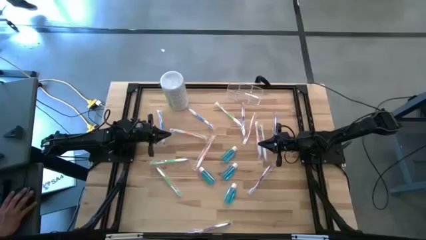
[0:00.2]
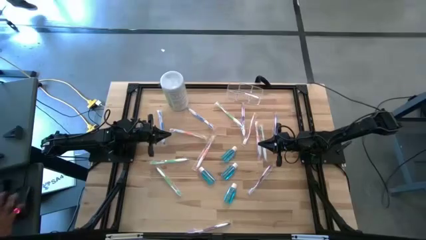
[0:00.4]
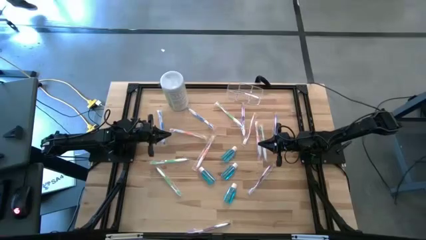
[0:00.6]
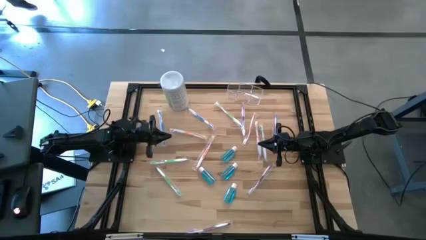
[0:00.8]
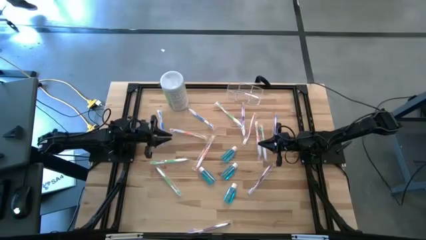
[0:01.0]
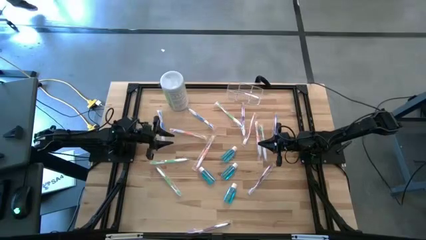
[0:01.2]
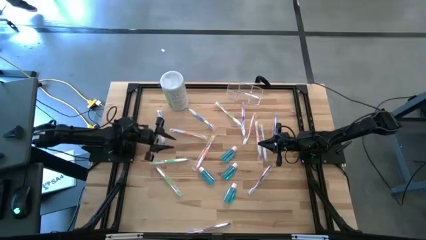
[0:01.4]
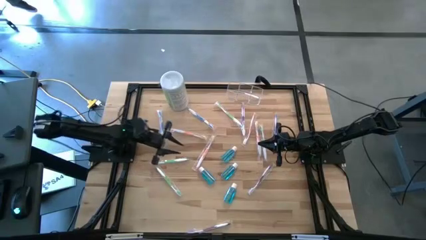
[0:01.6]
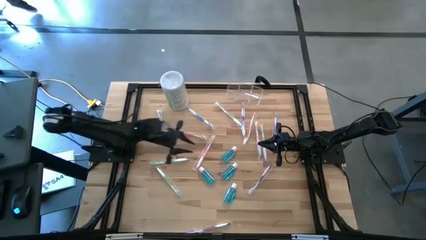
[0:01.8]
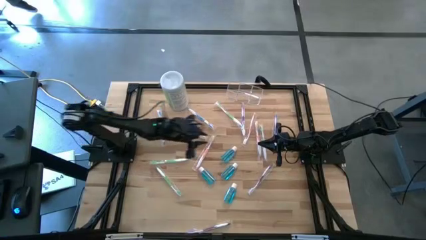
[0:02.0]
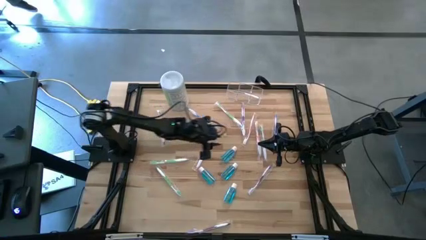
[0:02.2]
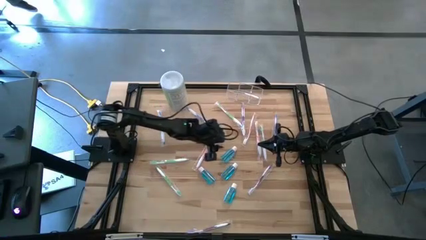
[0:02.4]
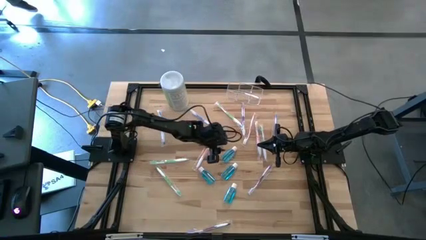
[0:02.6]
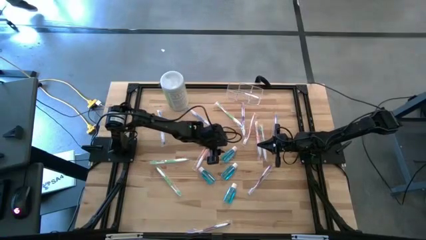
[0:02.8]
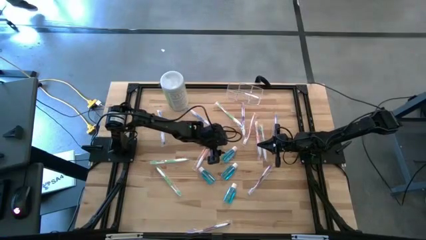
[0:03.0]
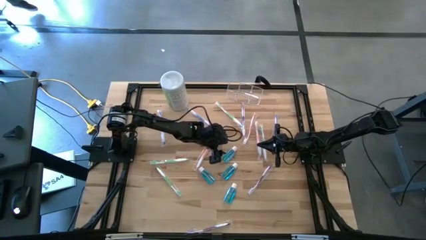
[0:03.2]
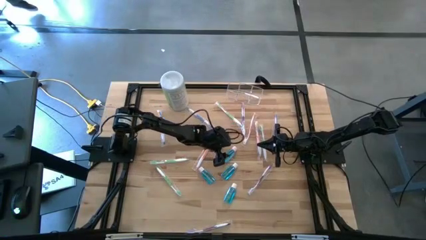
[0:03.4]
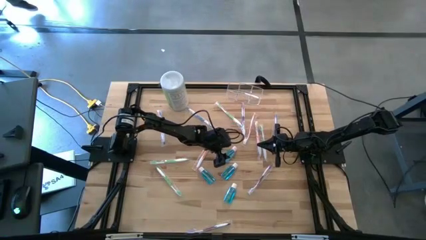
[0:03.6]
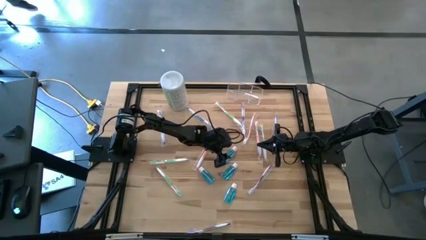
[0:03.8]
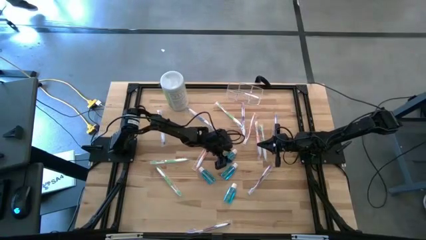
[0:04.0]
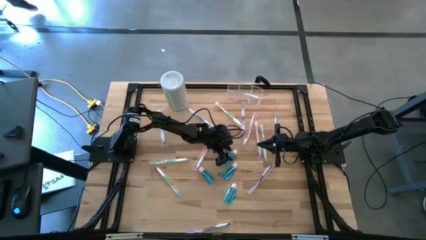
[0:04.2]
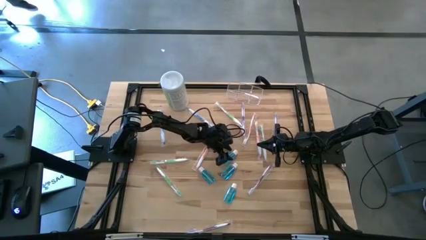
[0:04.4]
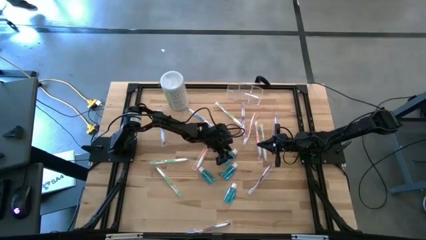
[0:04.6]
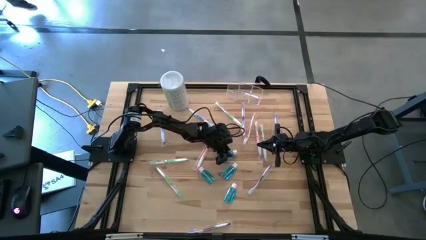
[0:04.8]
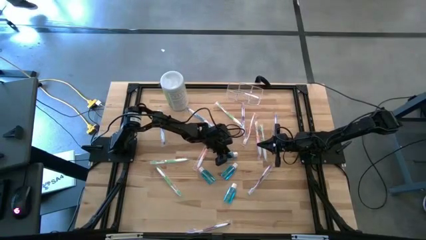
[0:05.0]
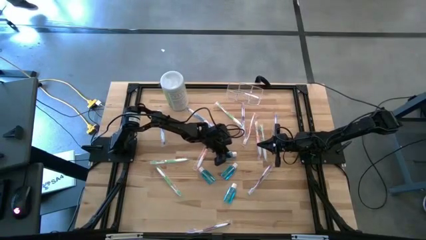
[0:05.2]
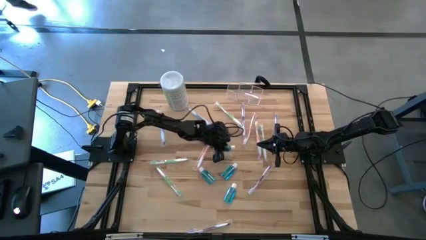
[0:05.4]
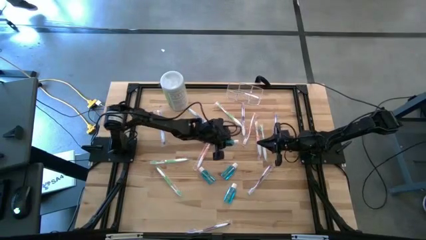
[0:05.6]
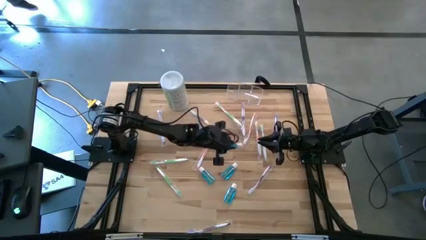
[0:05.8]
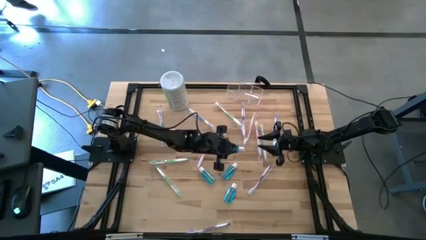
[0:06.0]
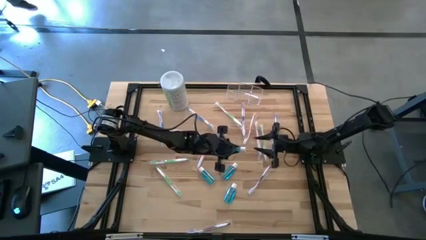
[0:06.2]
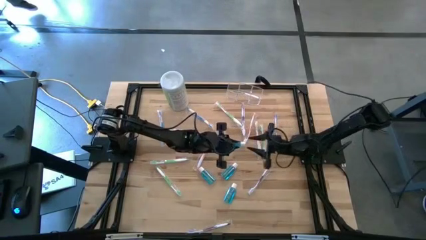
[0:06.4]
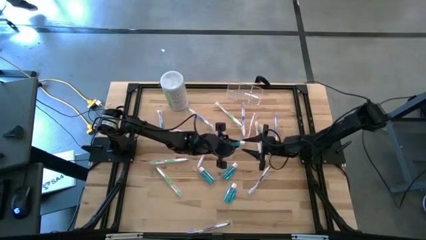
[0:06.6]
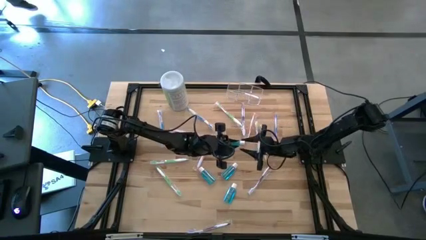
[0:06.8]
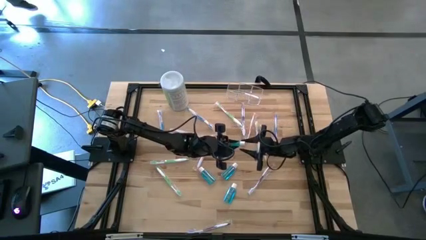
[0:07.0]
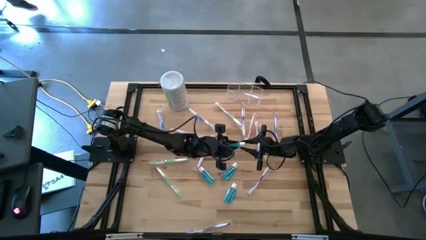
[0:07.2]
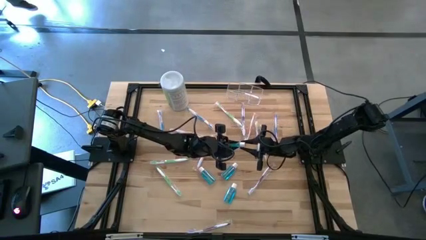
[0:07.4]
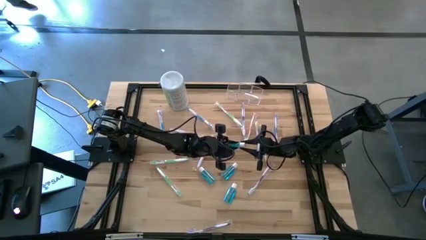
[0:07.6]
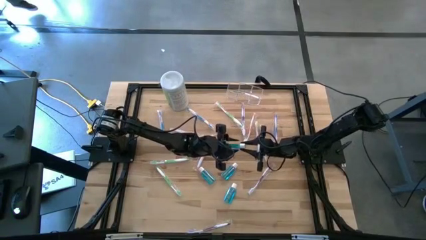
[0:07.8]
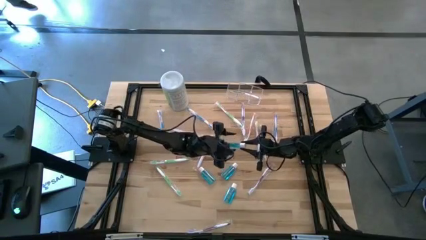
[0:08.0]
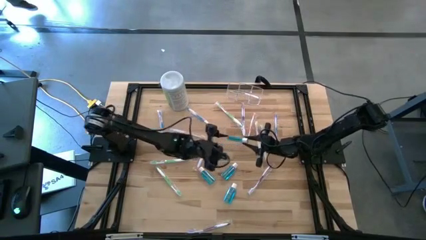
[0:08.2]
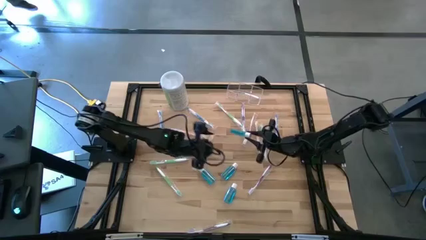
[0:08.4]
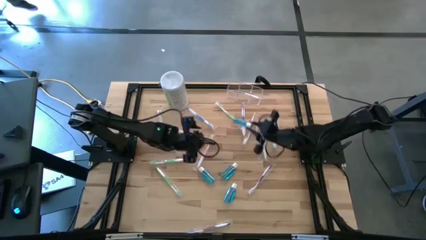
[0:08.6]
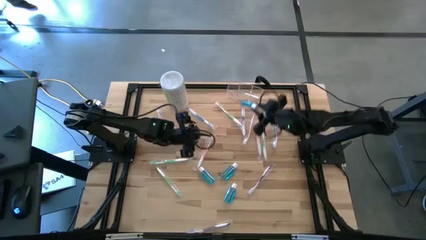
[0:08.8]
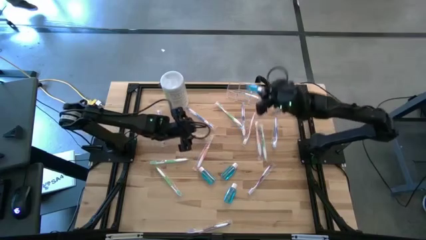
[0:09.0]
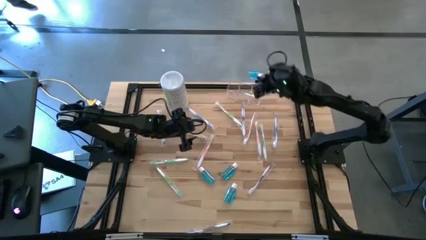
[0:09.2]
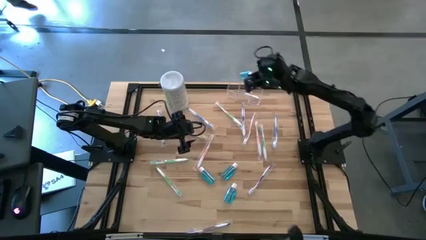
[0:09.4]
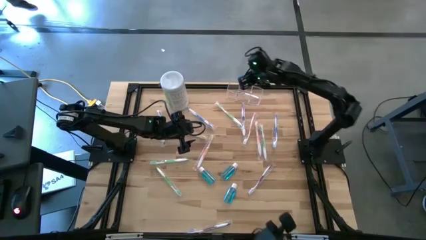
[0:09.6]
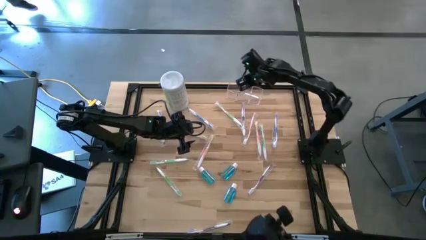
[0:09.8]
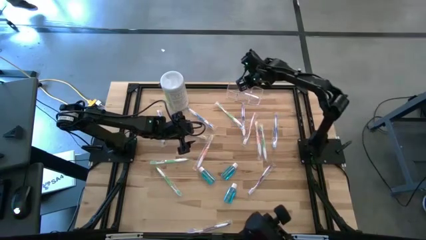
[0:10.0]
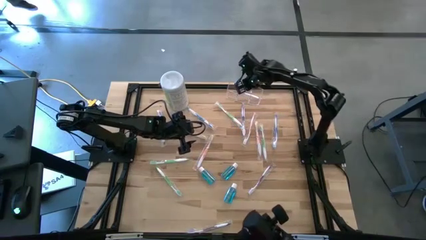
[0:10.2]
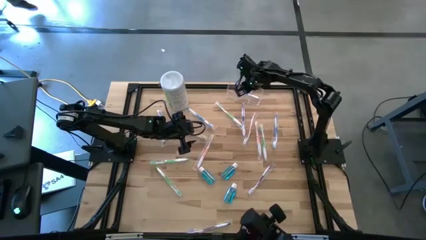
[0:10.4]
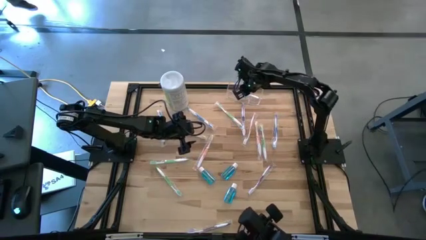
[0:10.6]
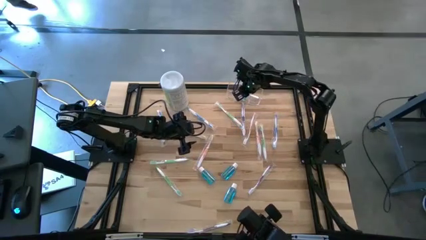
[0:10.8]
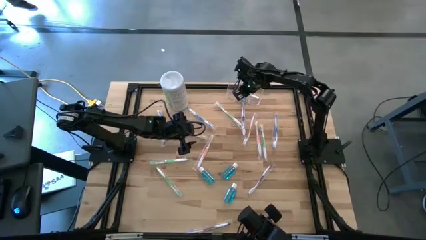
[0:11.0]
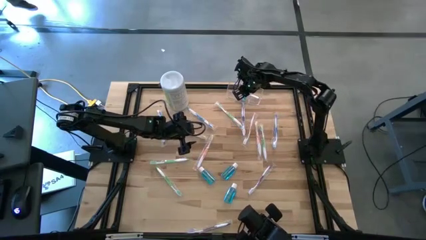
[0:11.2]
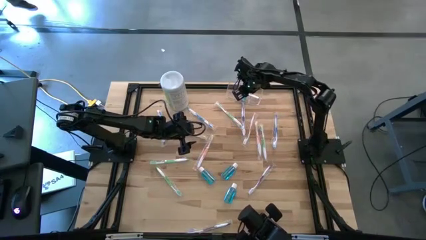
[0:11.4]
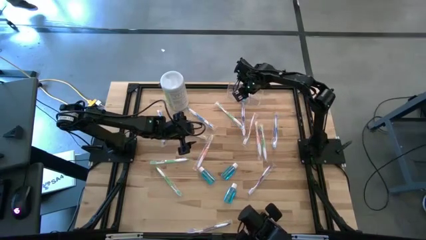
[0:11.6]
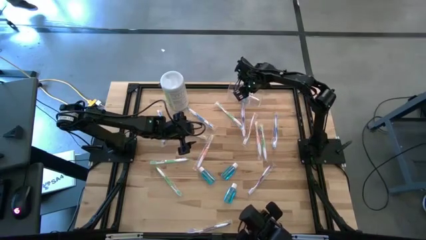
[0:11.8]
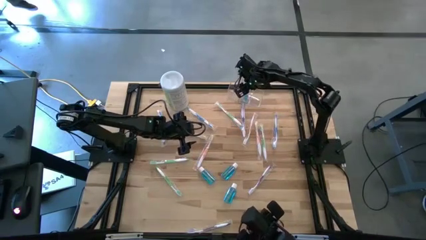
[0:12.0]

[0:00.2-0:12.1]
Task: Pick & Place toothbrushing station
Put the blue mouthwash into the transparent organizer
